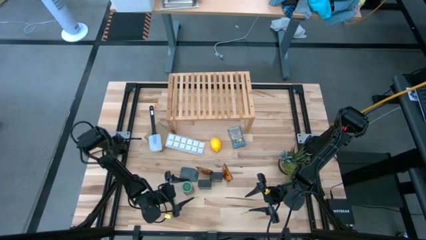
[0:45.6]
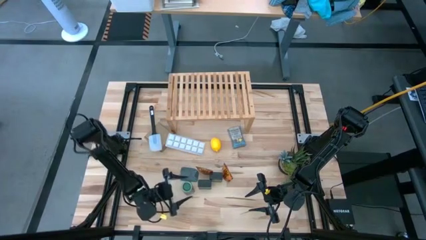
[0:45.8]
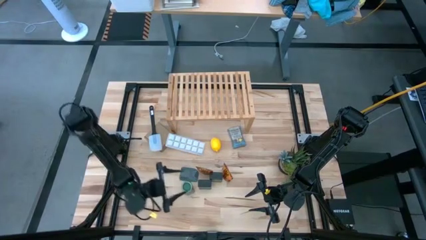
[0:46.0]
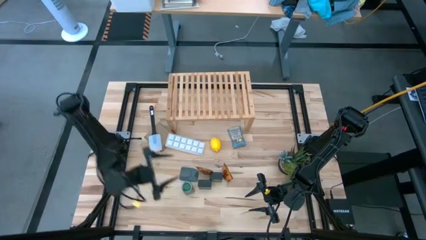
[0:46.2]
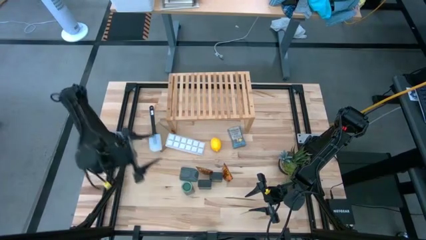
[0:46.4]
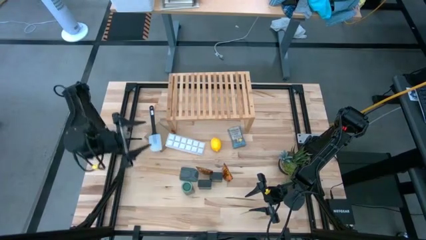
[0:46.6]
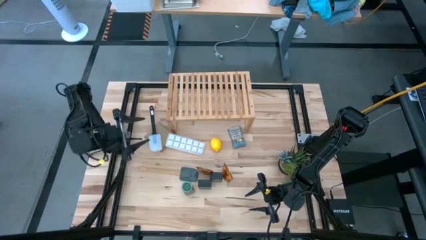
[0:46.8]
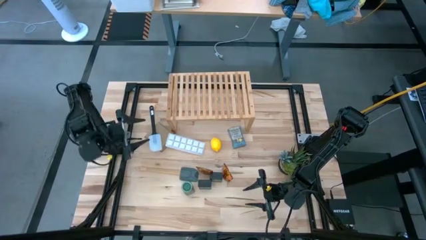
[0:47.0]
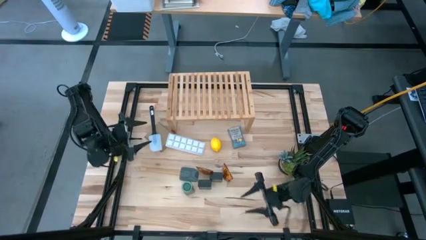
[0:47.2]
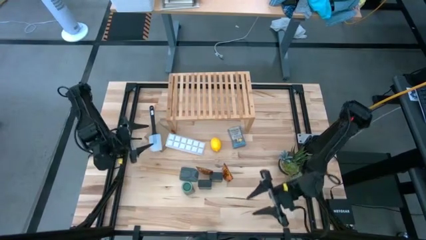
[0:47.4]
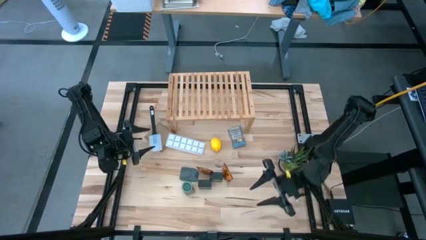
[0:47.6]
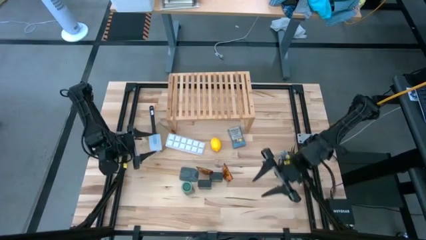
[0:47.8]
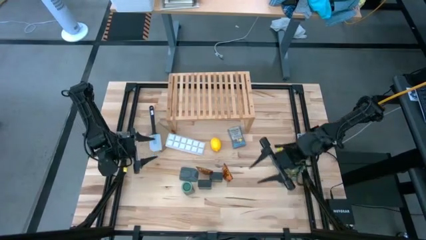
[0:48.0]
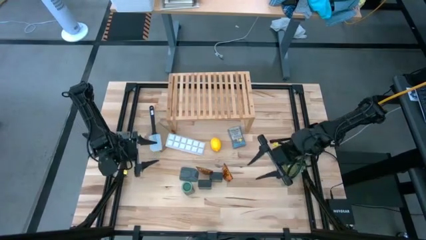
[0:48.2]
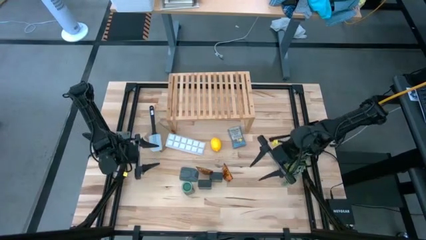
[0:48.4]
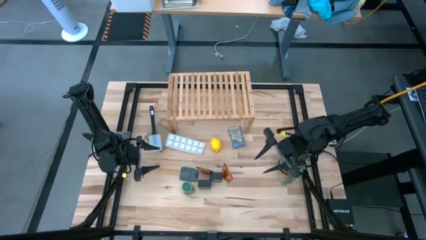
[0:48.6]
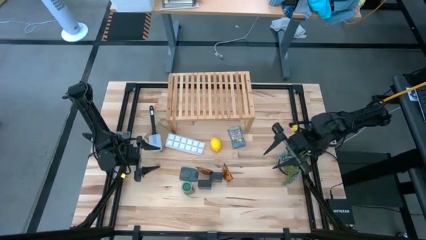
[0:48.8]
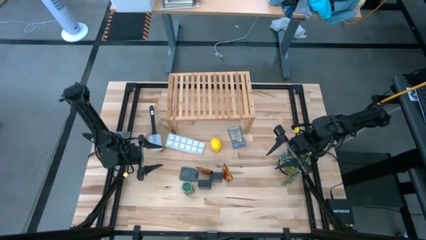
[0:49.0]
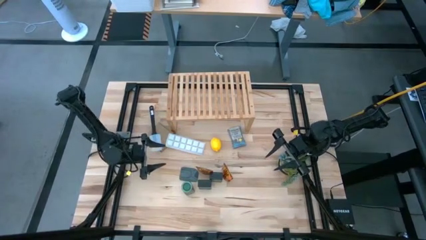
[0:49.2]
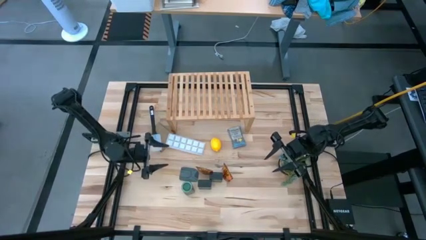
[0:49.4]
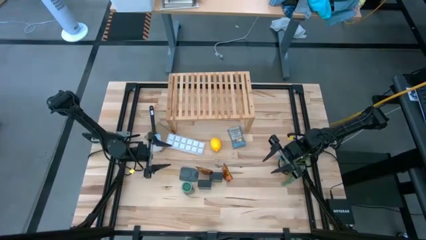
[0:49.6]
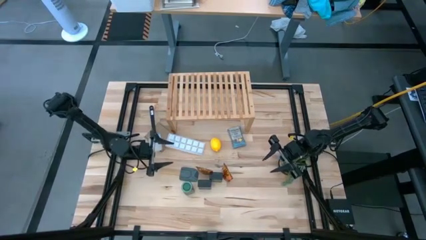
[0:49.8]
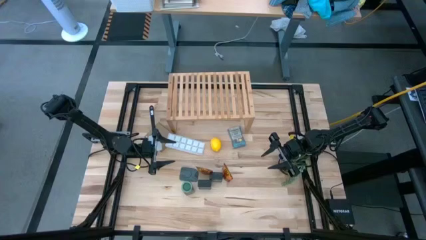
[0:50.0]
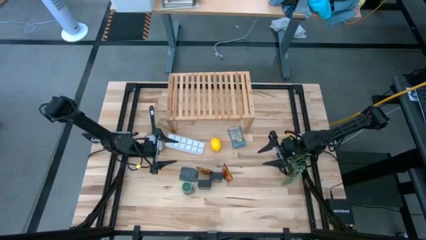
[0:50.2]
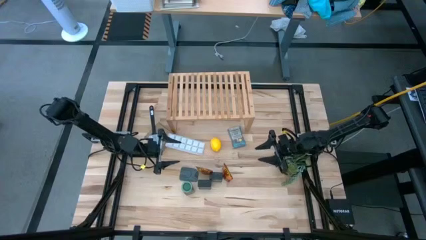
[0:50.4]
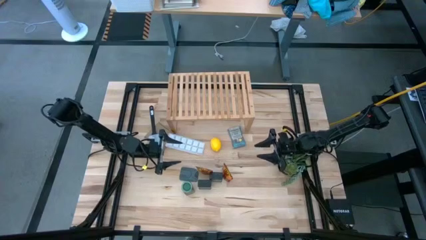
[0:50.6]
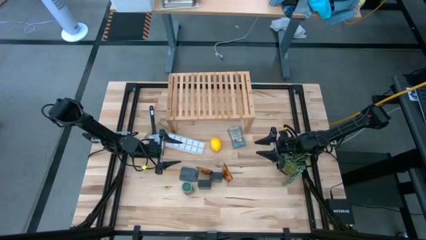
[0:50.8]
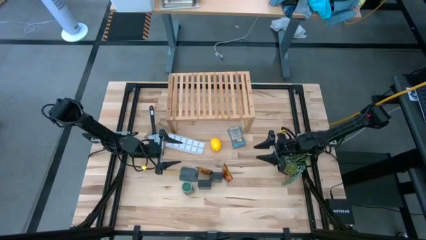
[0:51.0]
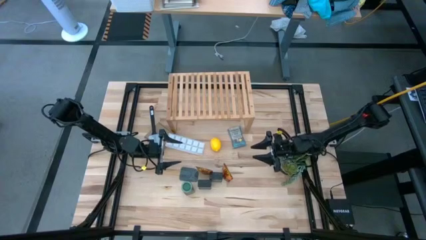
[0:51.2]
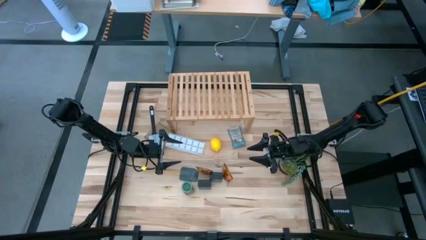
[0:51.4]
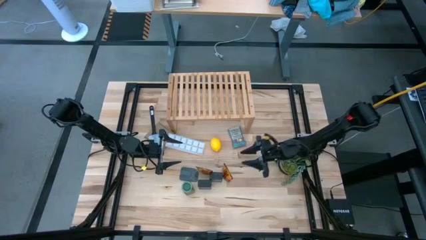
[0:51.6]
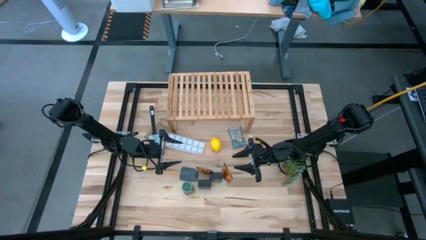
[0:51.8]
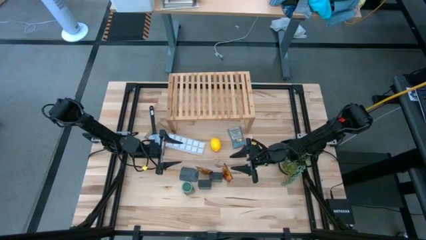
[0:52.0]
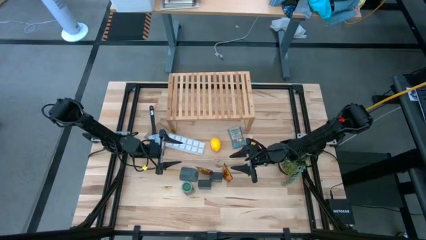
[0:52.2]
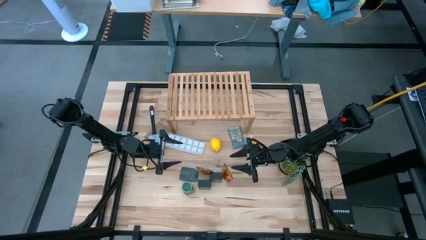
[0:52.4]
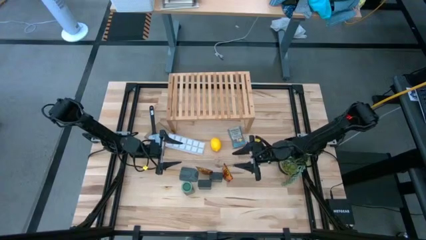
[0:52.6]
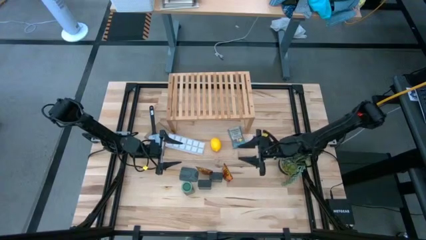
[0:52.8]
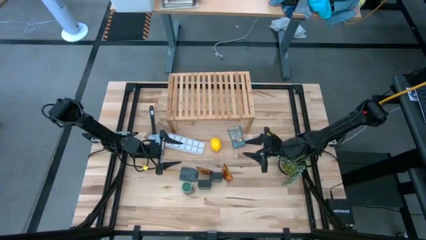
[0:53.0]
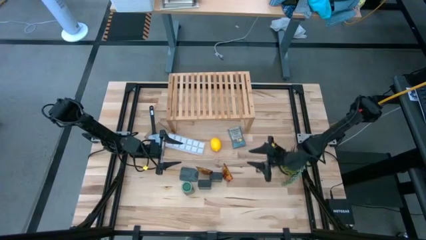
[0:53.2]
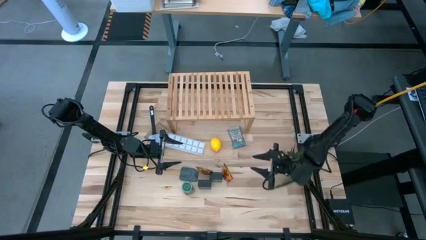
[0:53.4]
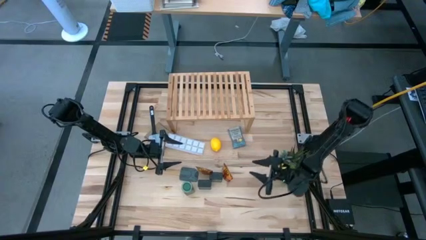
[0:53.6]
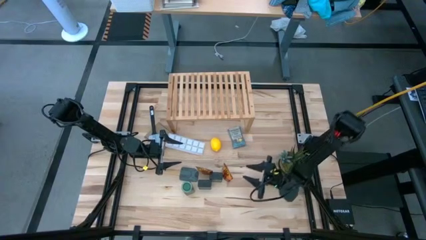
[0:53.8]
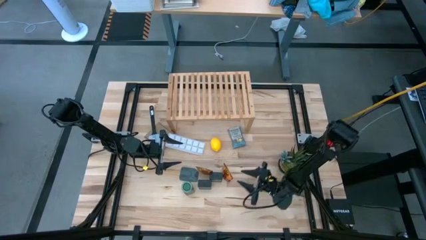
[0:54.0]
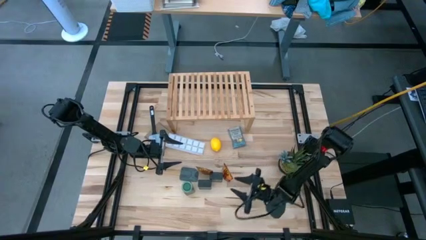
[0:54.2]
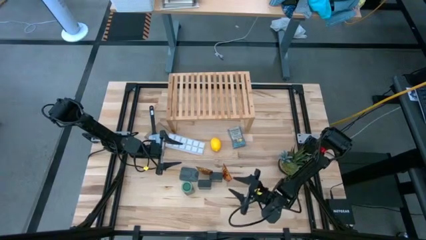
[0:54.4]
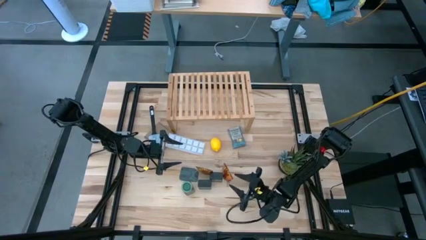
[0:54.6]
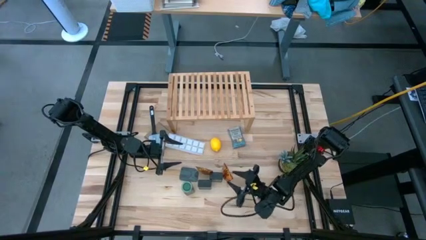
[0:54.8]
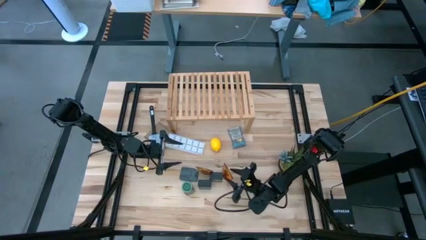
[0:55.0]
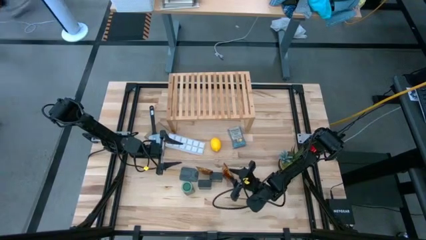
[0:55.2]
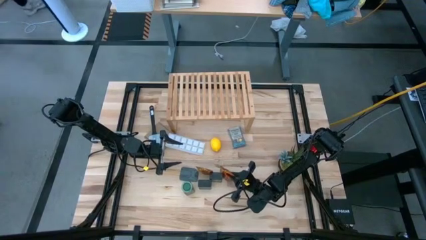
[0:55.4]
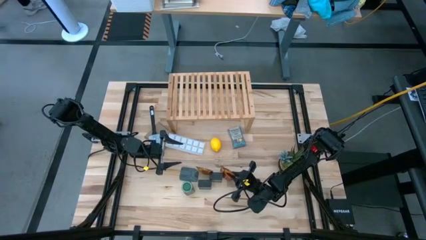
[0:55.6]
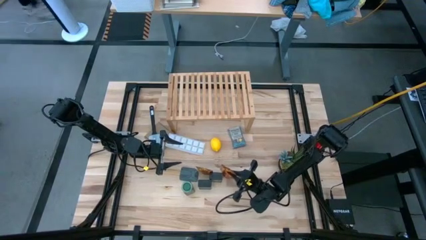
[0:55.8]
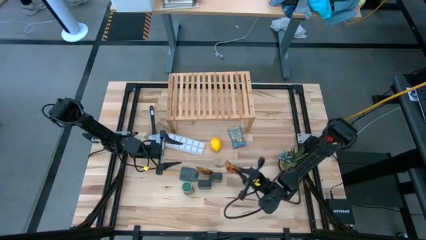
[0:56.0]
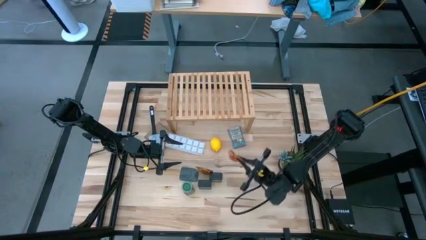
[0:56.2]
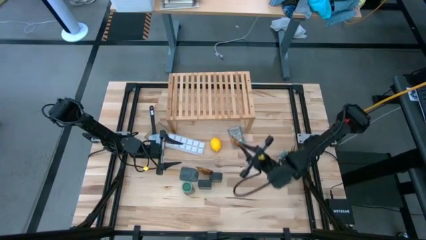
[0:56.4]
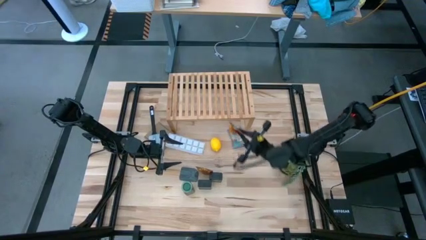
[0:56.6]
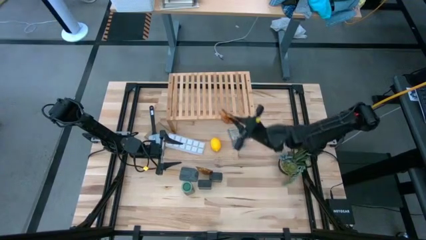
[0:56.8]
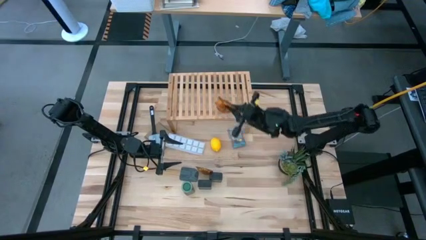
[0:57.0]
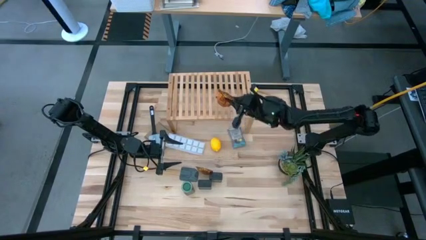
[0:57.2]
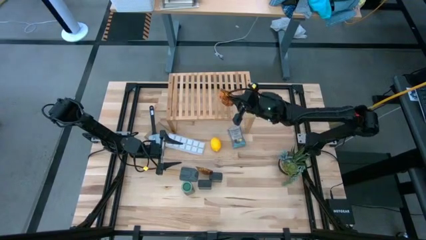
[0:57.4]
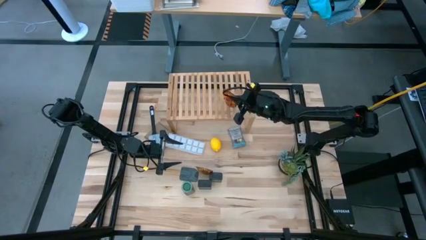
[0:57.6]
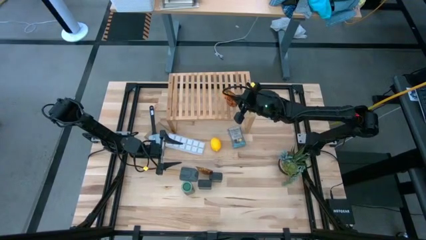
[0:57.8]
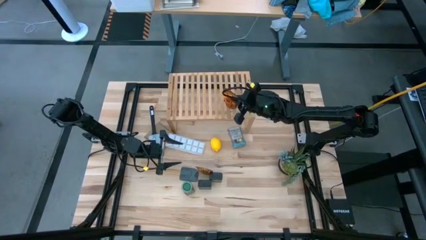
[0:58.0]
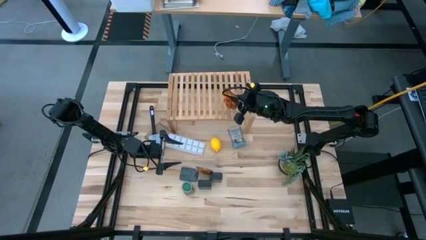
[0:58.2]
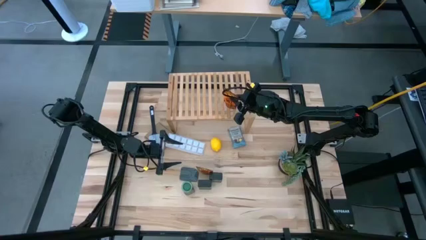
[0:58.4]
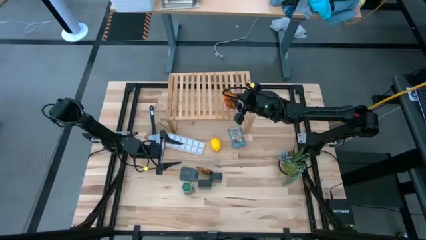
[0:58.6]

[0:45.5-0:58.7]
Task: Shelf spices
Put the right orange seasoning pack on the shelf

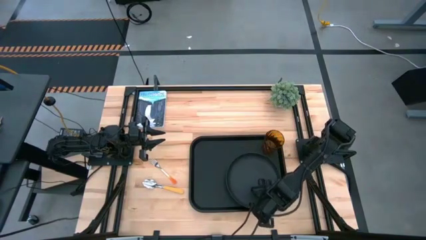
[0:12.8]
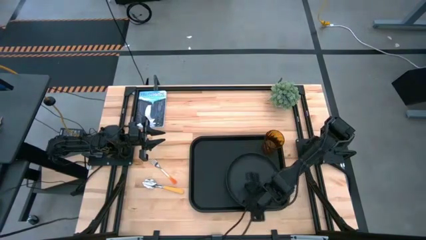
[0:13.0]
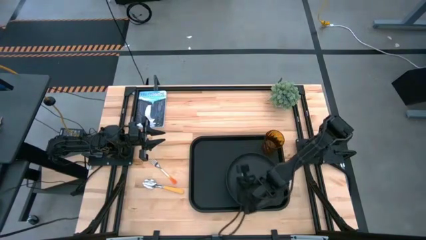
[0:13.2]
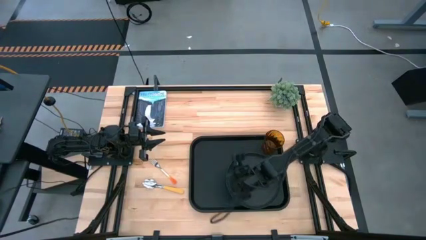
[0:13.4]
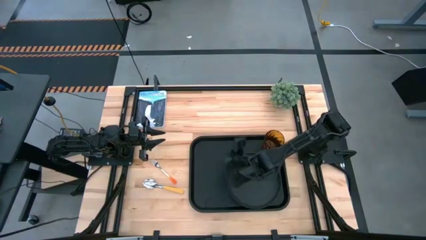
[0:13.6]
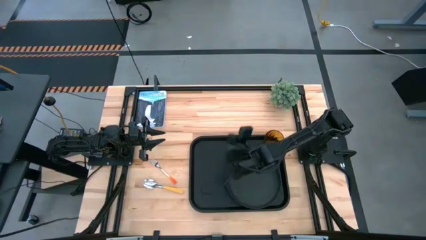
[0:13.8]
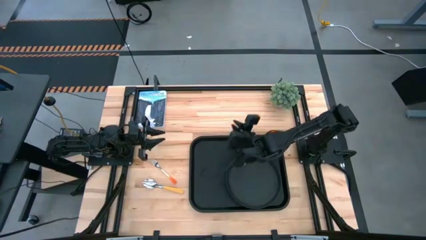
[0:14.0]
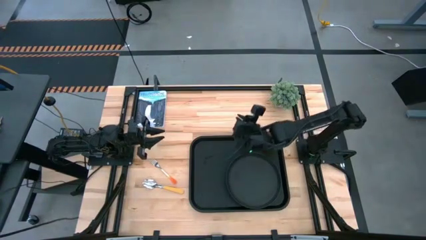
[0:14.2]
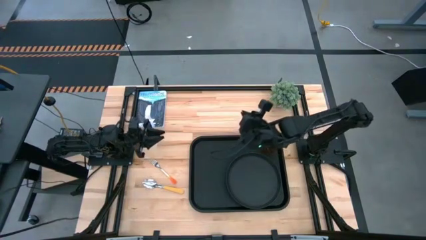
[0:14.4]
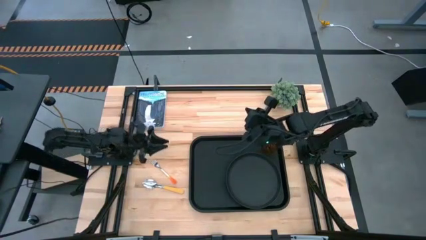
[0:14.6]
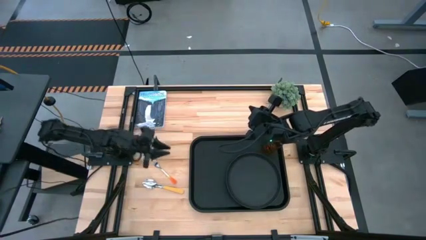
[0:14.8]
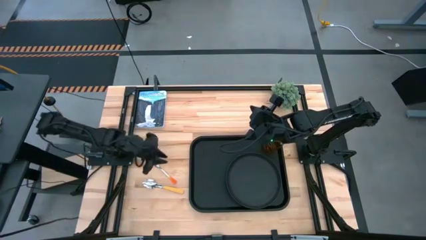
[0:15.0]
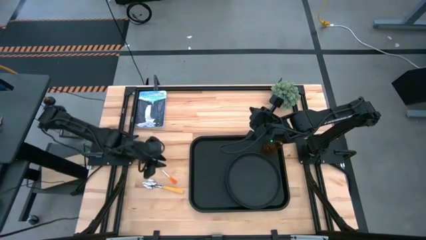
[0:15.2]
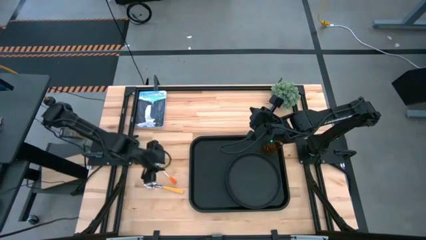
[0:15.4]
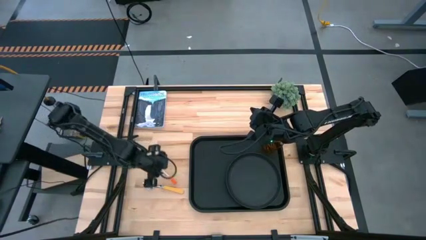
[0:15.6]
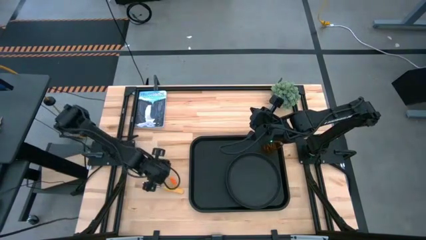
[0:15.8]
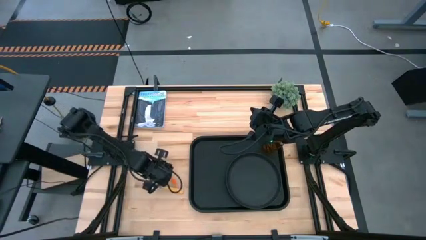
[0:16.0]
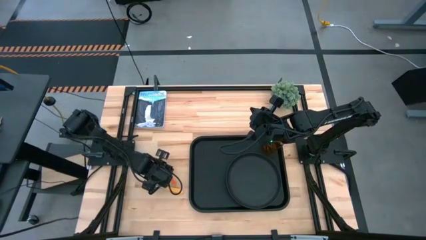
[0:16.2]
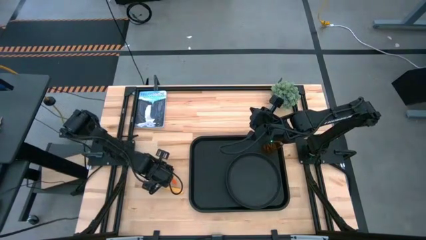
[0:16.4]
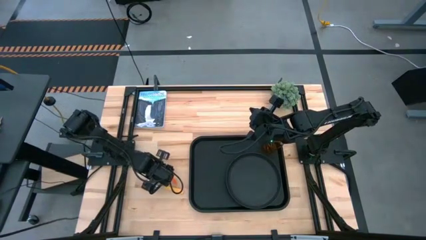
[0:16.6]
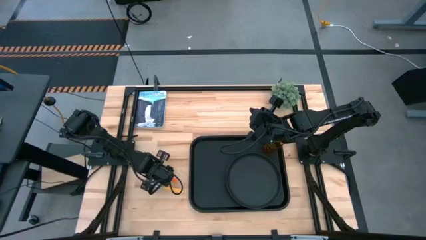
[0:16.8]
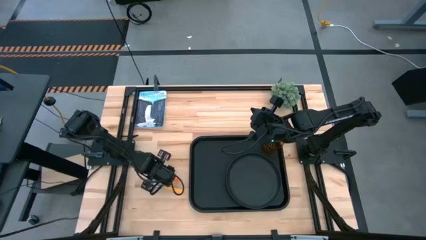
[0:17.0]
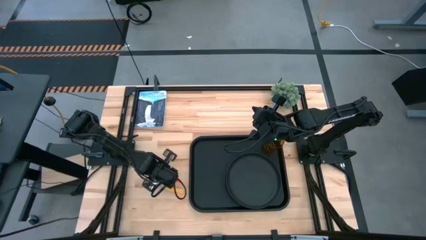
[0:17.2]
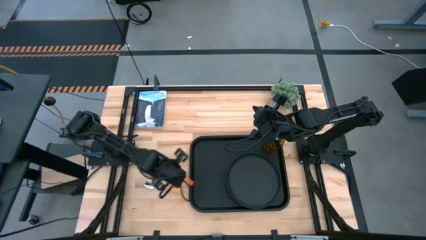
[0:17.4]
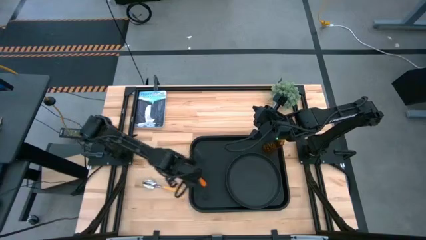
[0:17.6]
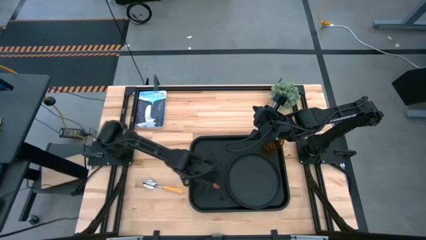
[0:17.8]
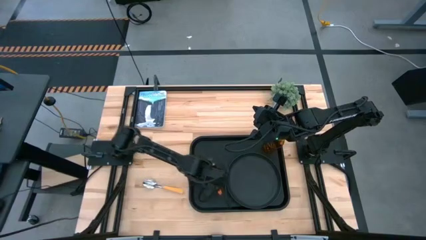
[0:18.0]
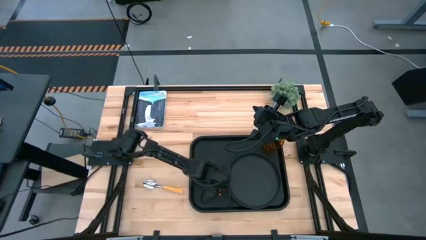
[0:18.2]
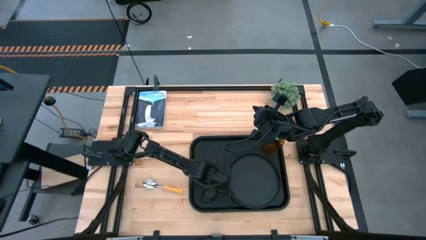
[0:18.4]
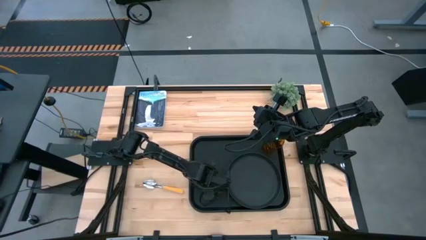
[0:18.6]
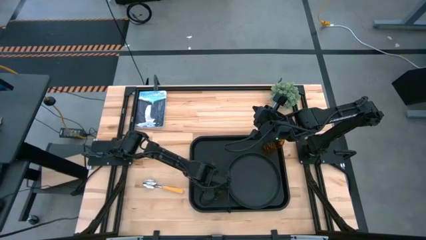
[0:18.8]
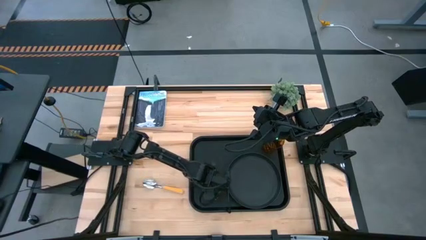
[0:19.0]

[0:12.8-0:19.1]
Task: Pick and place plate/cup/fork/spoon on tray
Put the orange fork on the black tray to the left of the black plate
